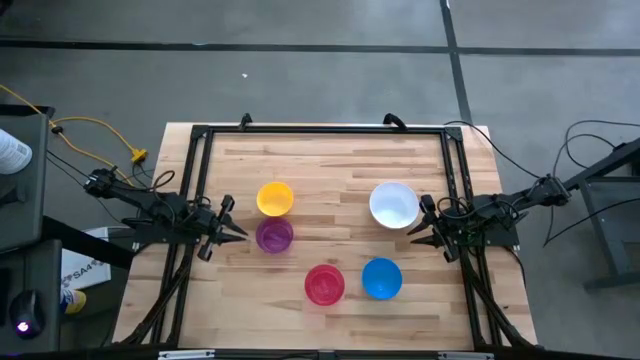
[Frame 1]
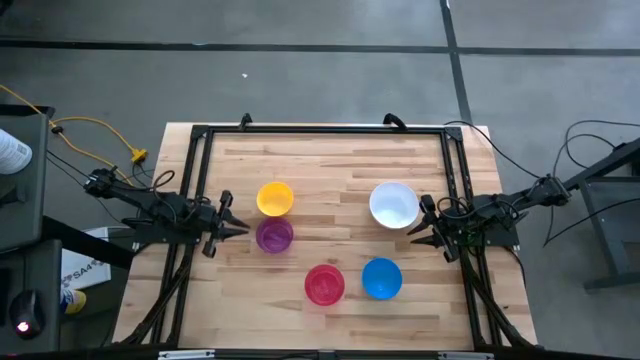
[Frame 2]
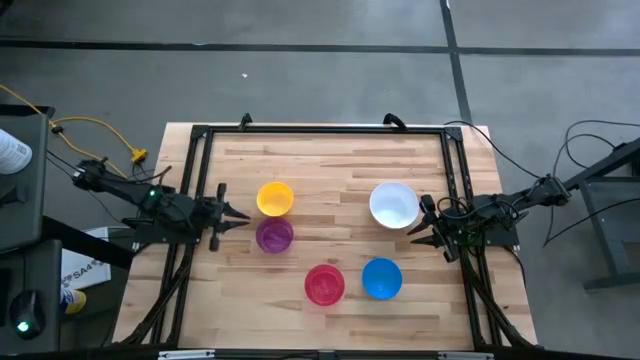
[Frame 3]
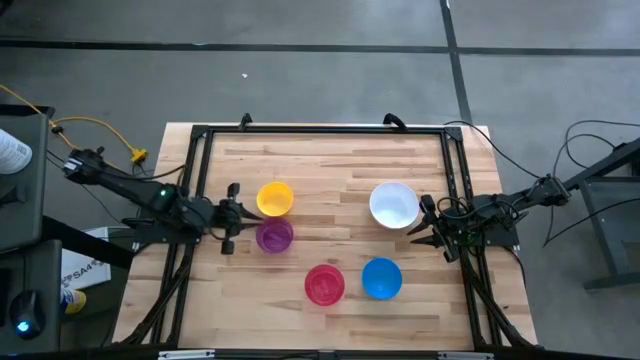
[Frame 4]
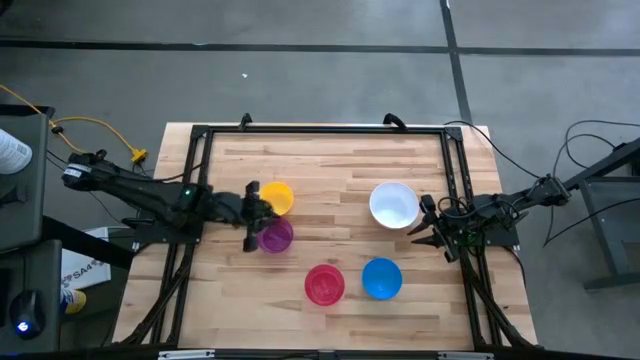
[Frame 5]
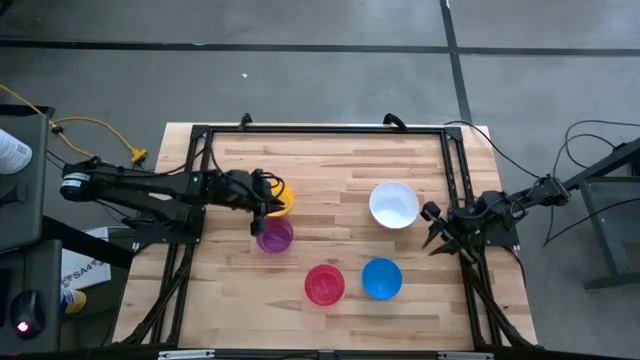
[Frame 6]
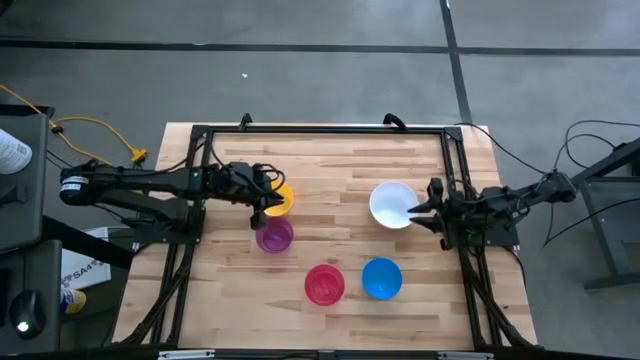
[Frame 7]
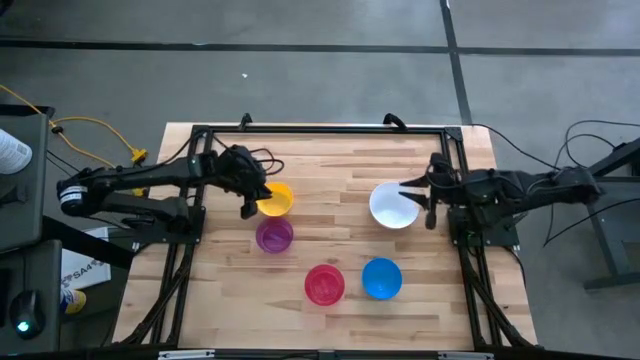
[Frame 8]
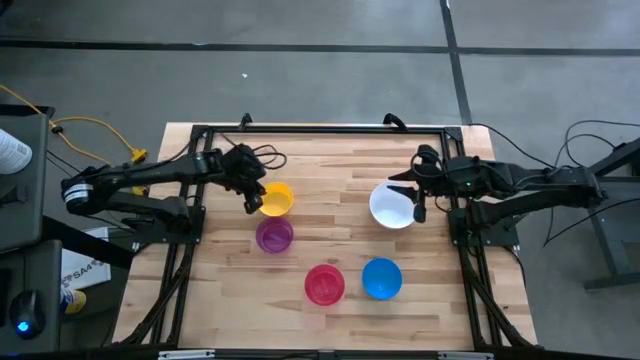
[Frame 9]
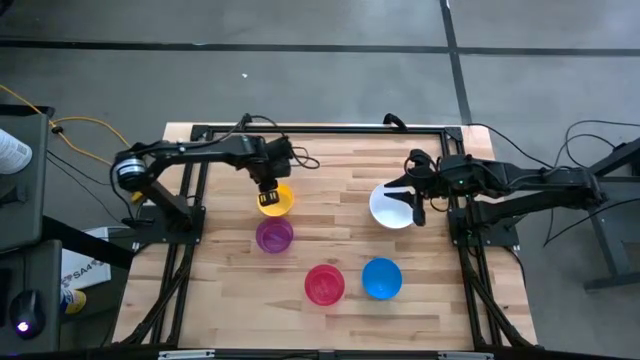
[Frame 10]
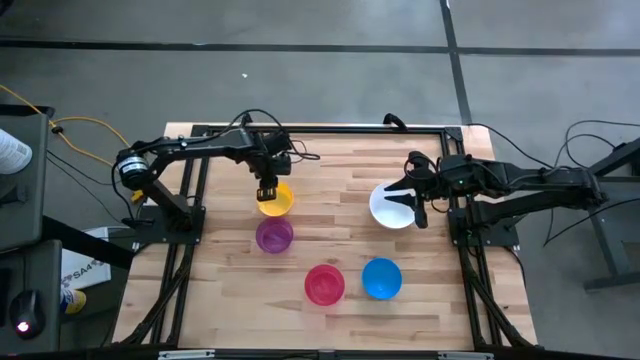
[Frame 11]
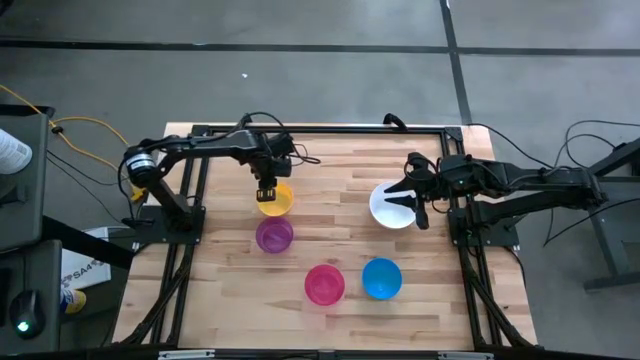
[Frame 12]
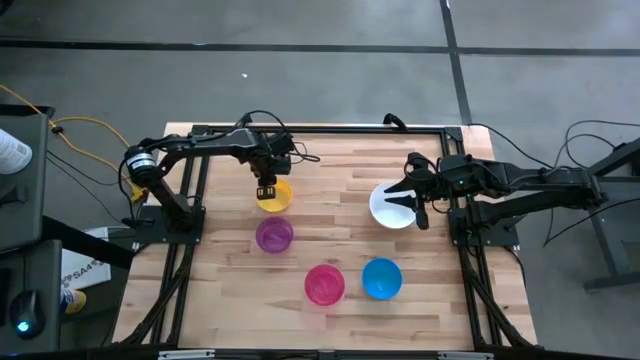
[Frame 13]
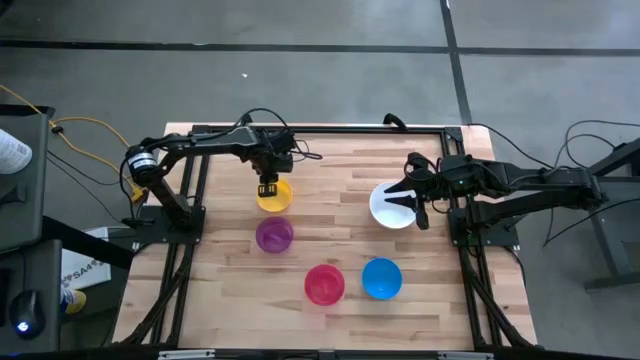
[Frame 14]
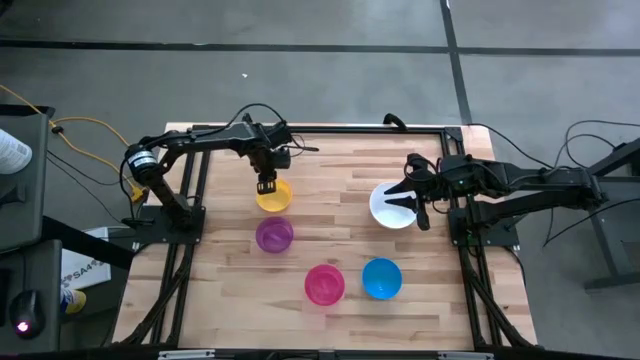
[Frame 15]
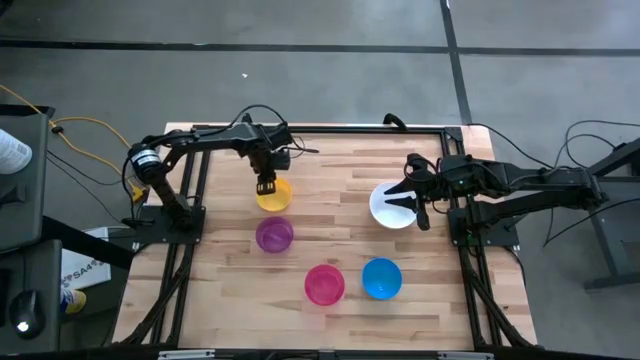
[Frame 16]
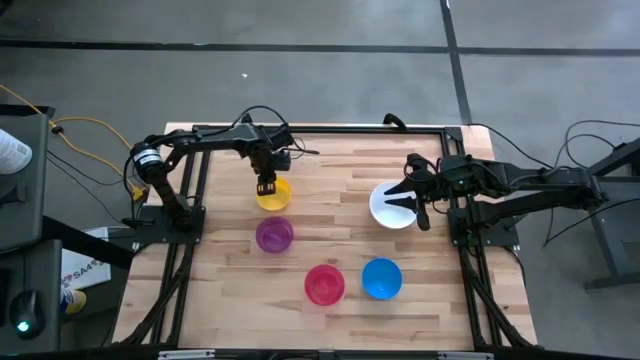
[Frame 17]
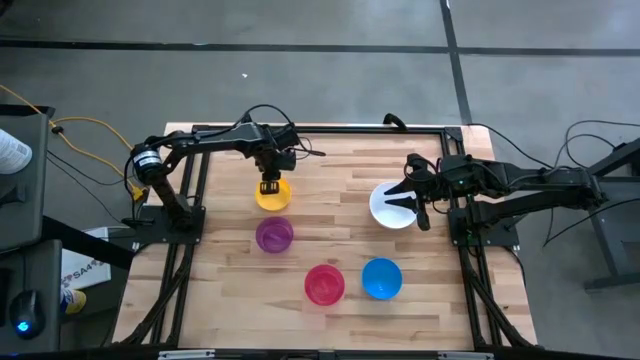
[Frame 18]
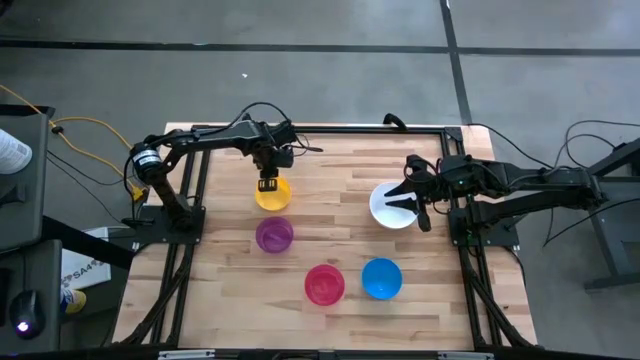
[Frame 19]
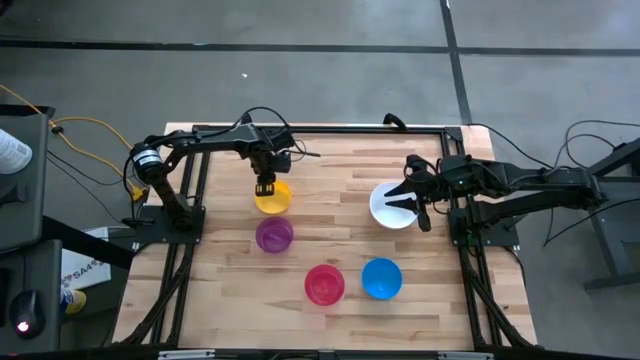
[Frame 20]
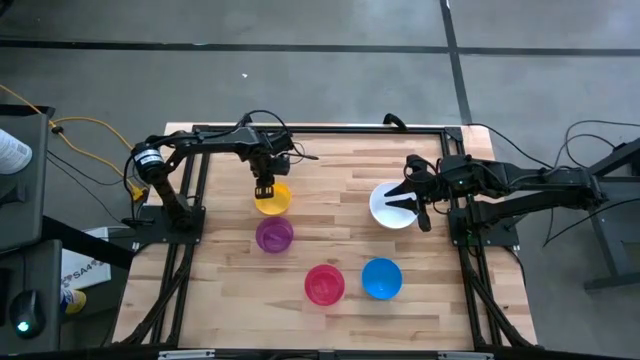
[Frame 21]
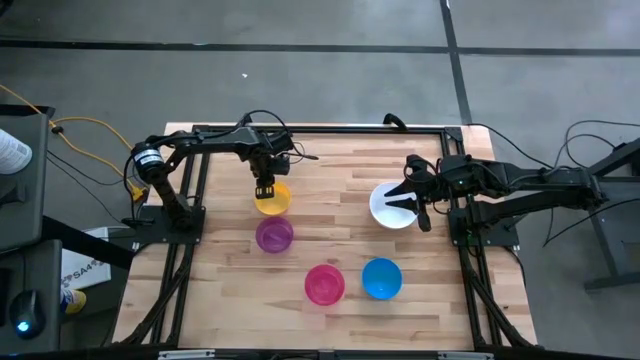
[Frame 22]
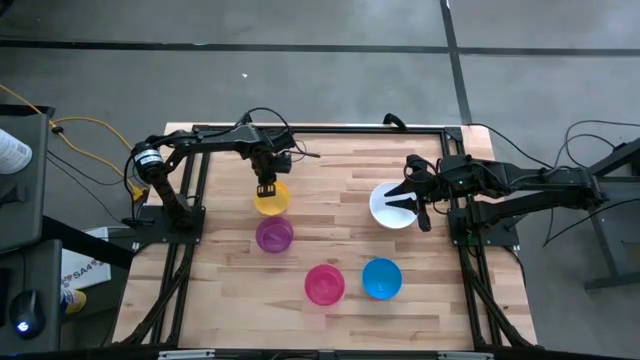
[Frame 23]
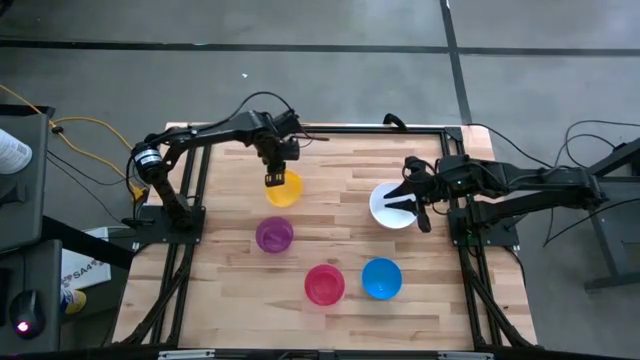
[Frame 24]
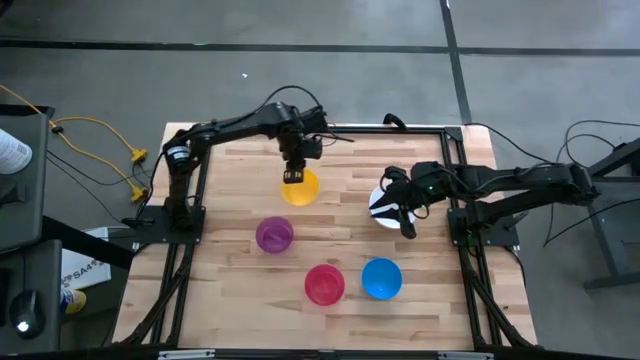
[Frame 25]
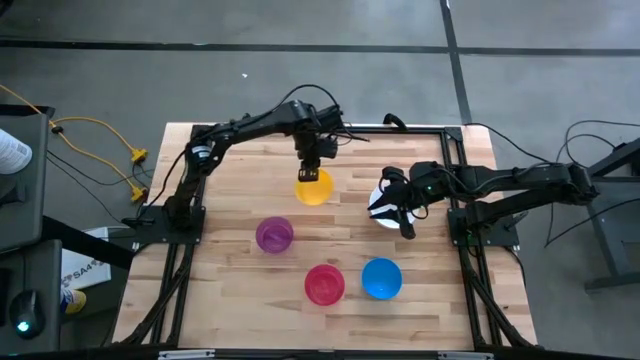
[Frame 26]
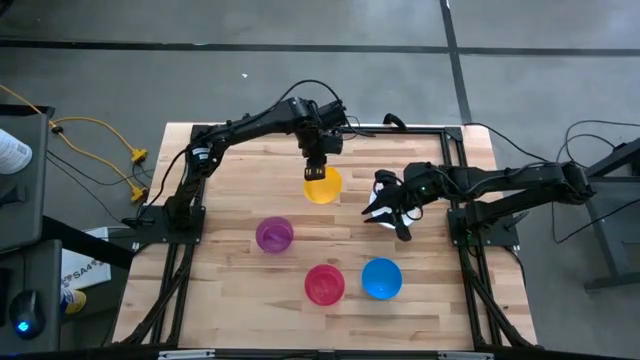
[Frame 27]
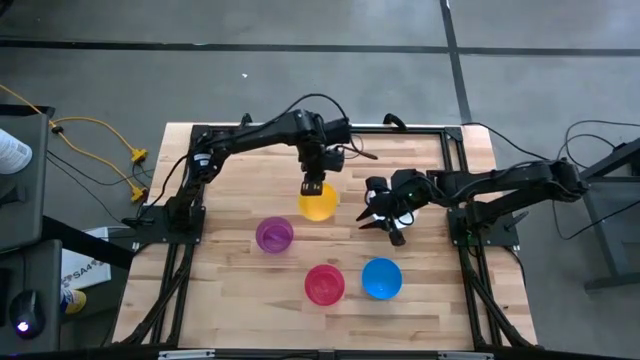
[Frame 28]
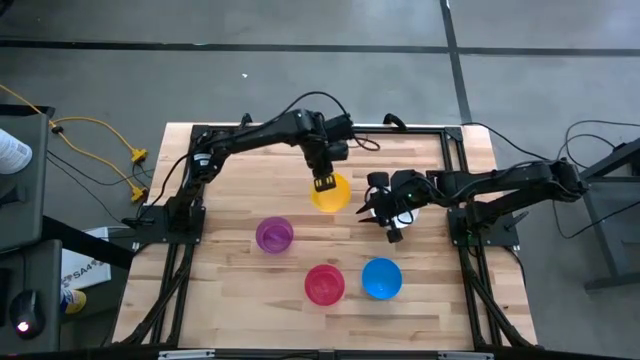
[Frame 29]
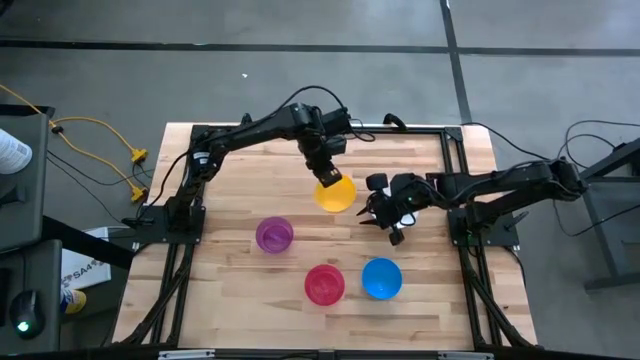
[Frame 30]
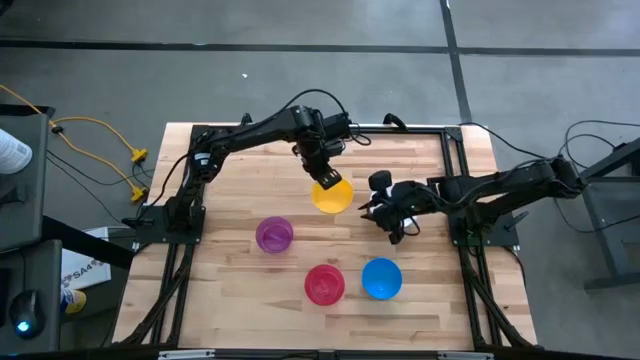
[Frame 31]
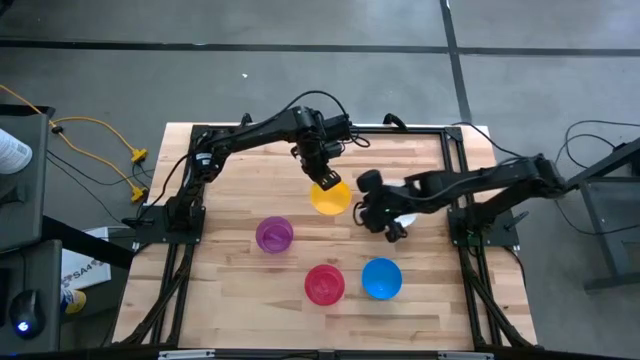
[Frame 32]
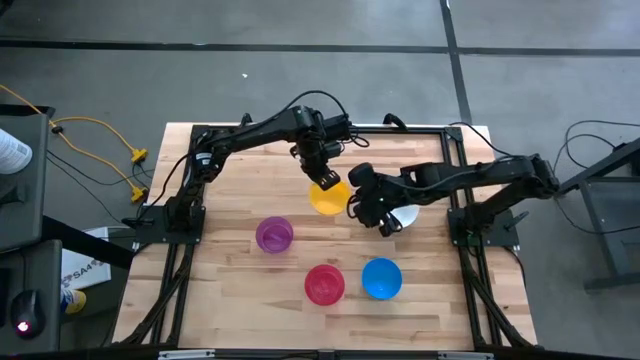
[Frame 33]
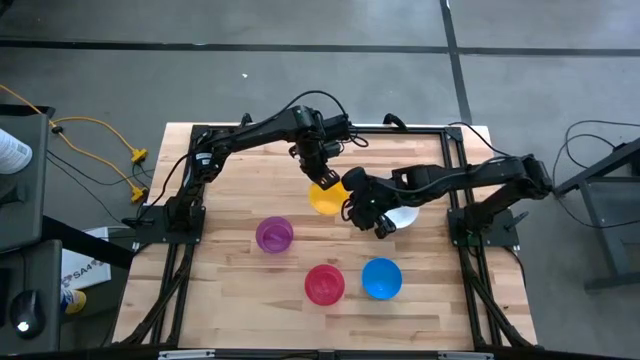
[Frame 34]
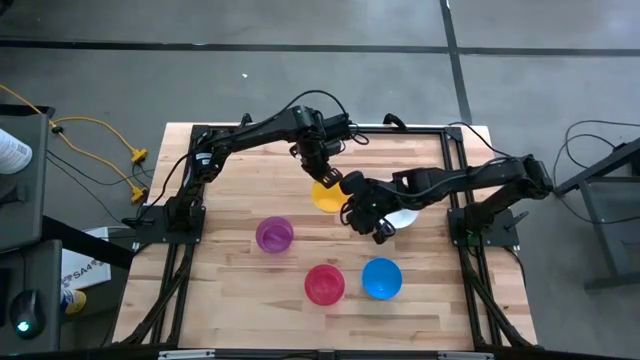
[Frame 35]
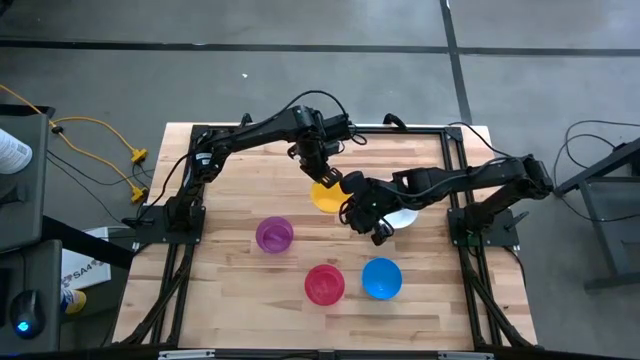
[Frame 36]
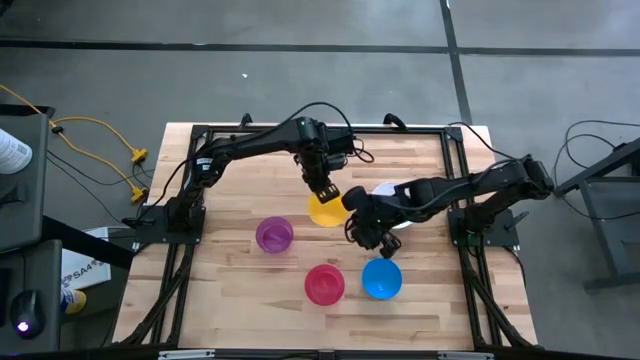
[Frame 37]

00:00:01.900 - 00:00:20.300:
Stack the yellow bowl on top of the white bowl
